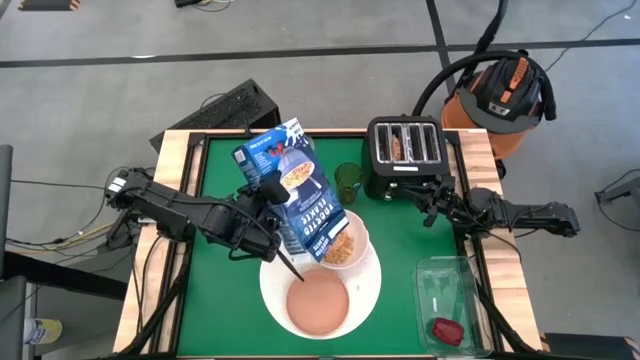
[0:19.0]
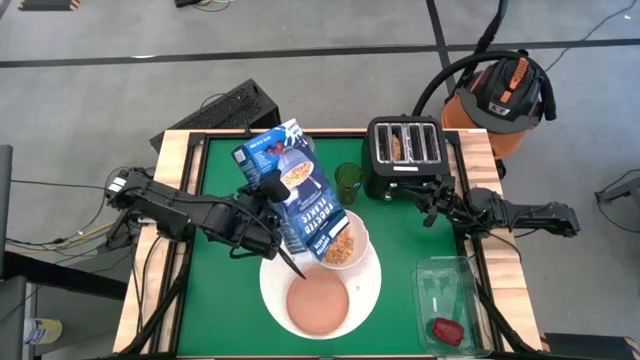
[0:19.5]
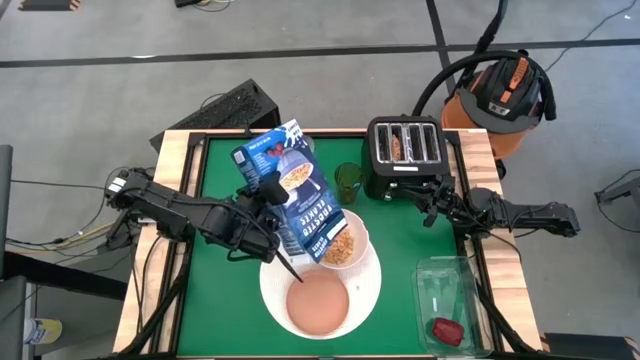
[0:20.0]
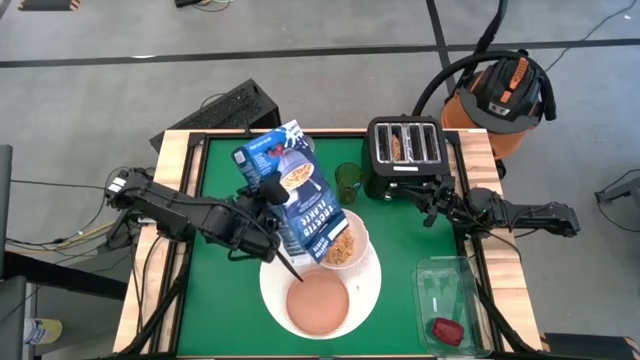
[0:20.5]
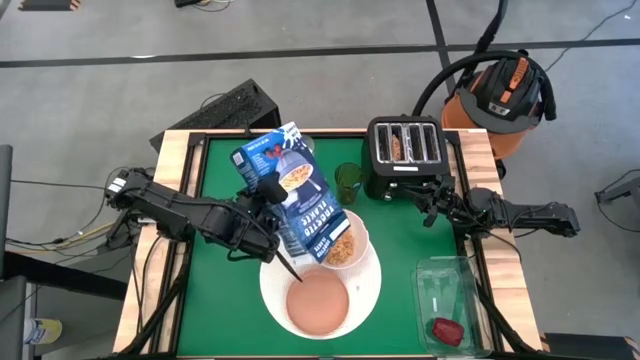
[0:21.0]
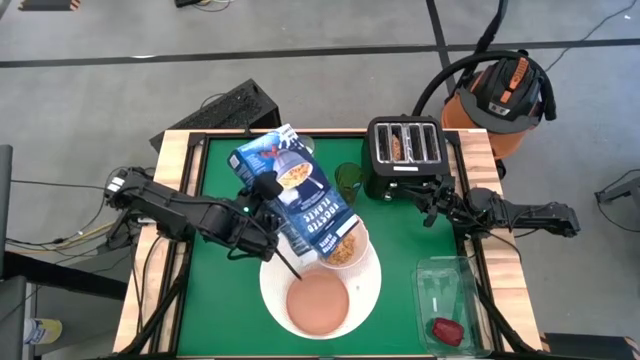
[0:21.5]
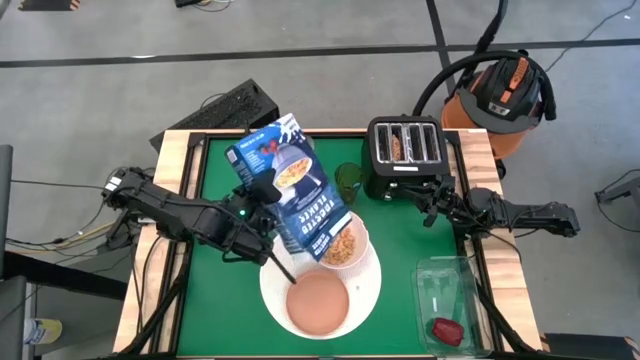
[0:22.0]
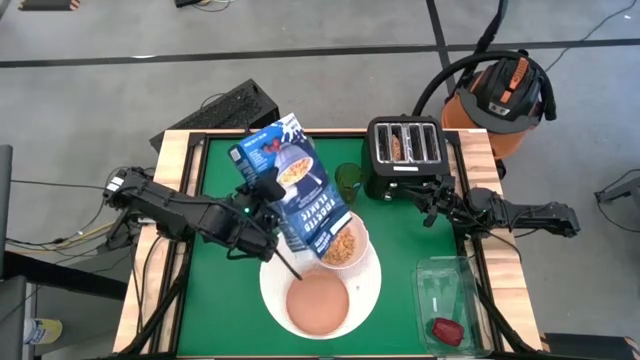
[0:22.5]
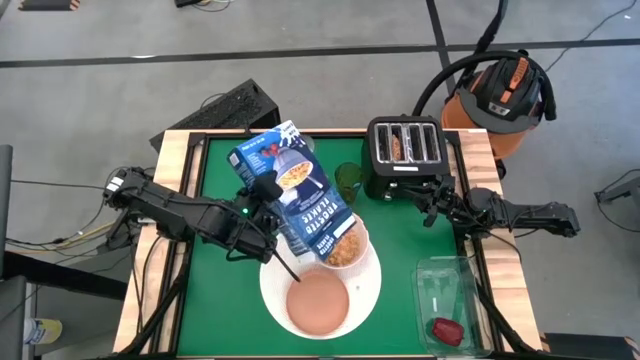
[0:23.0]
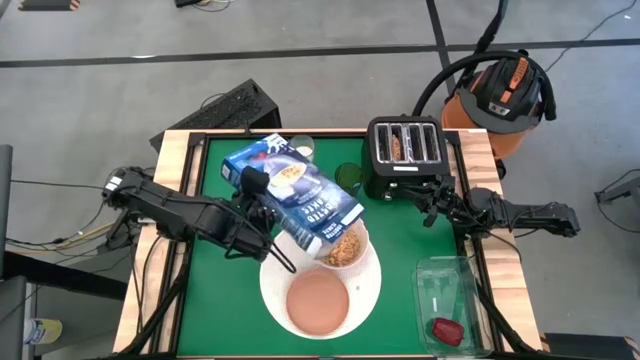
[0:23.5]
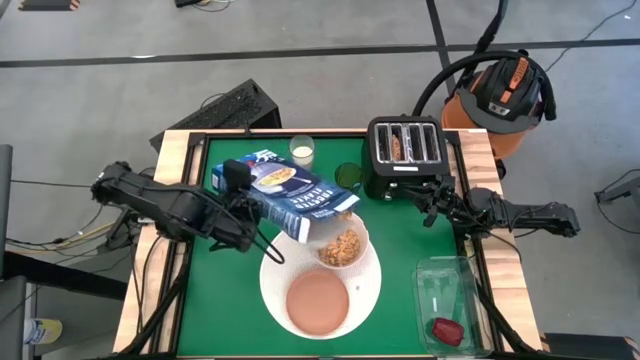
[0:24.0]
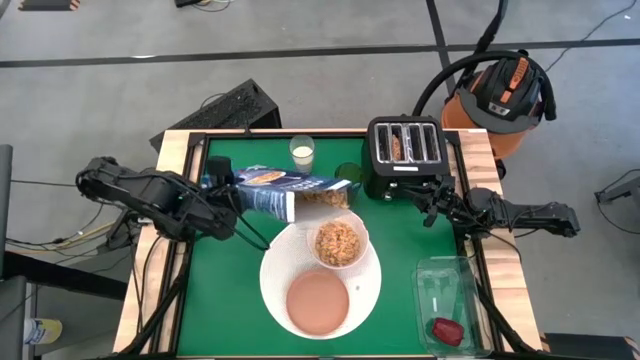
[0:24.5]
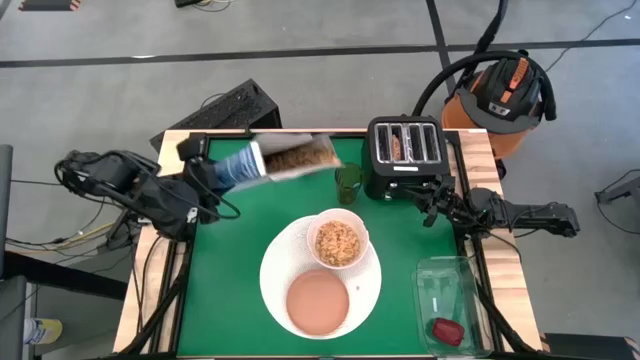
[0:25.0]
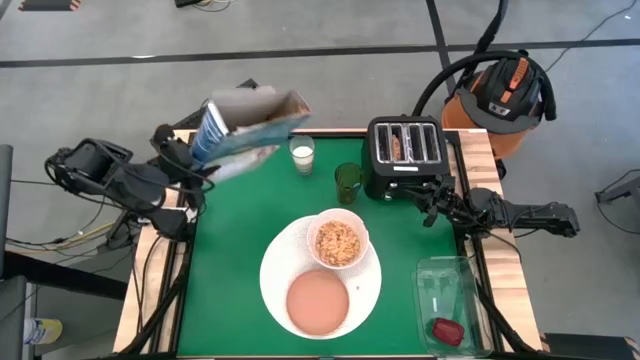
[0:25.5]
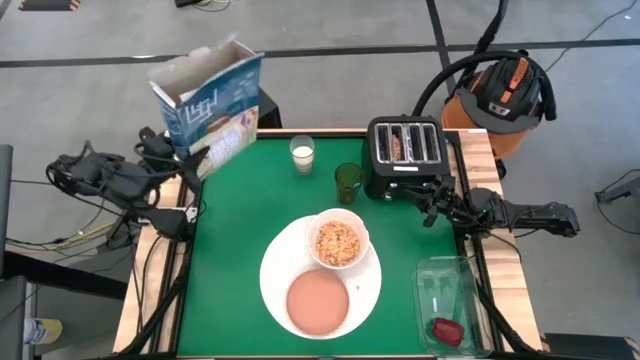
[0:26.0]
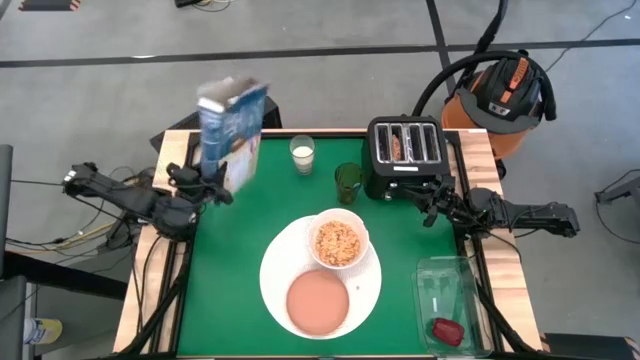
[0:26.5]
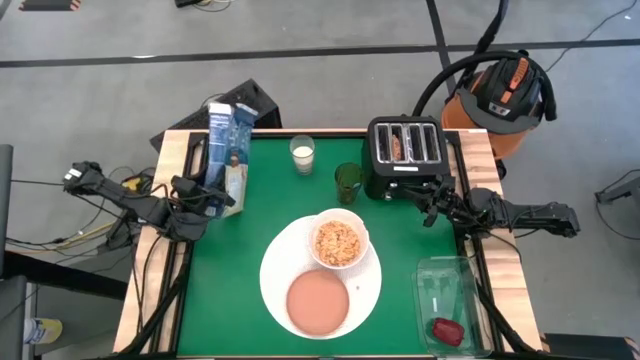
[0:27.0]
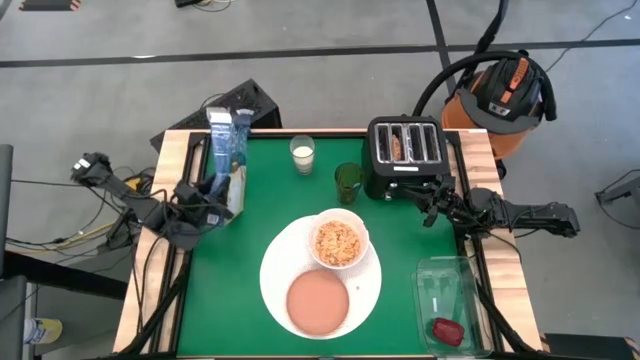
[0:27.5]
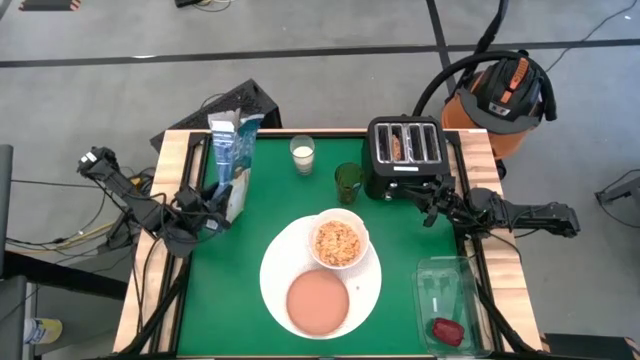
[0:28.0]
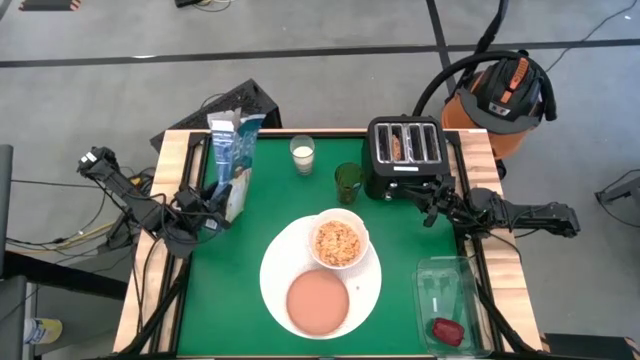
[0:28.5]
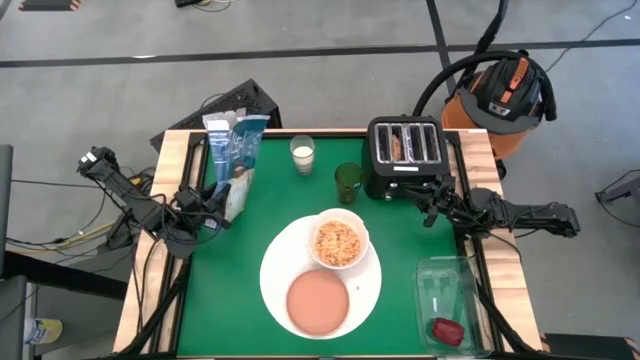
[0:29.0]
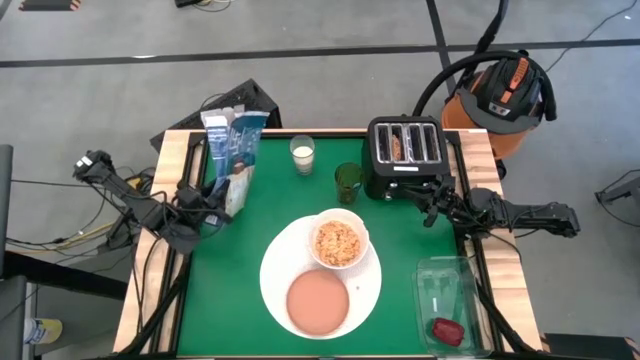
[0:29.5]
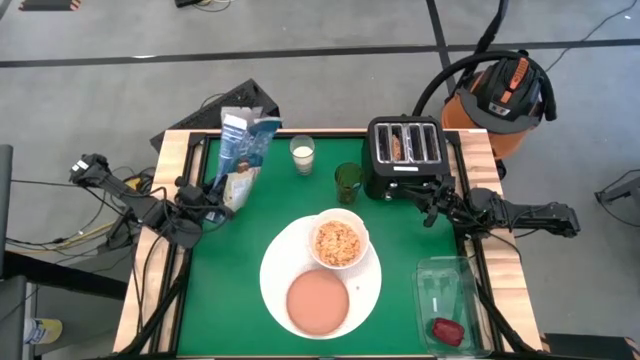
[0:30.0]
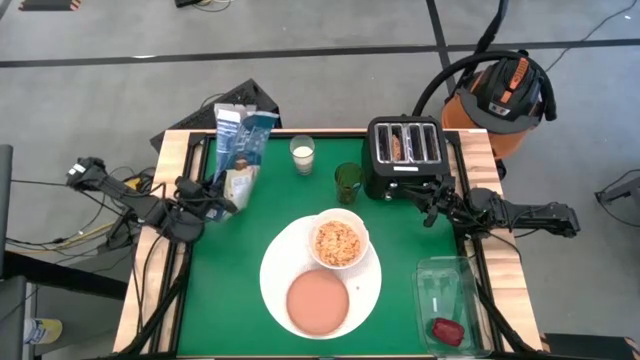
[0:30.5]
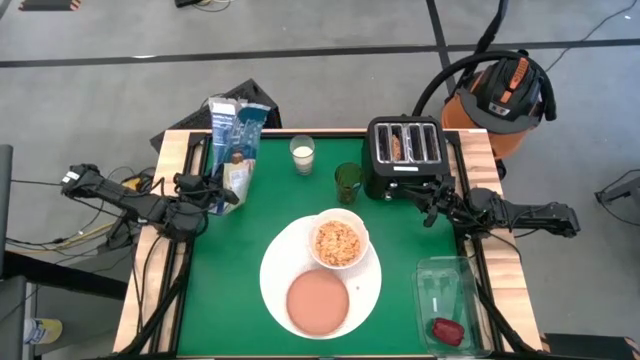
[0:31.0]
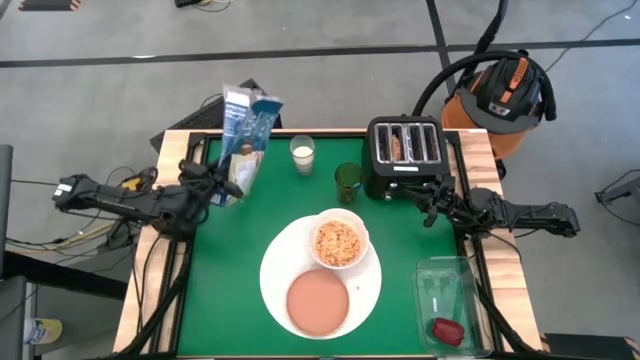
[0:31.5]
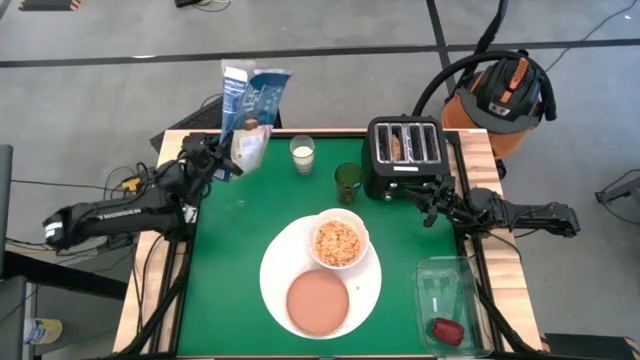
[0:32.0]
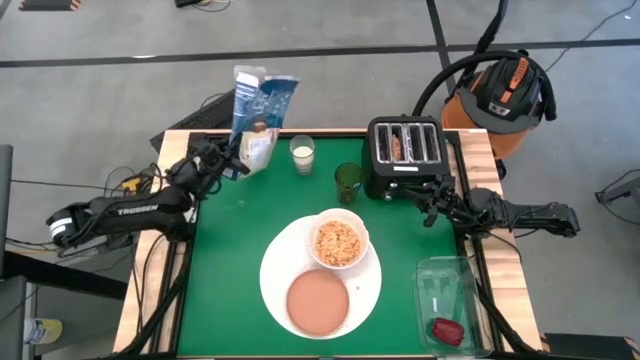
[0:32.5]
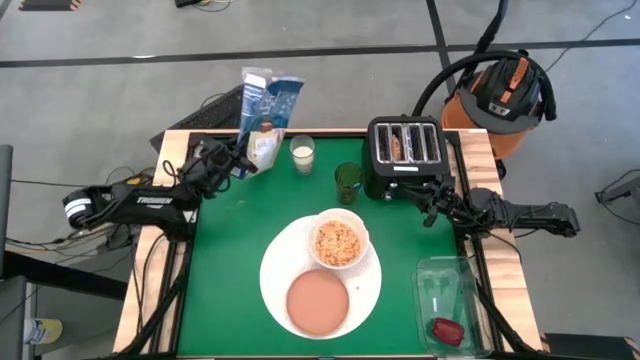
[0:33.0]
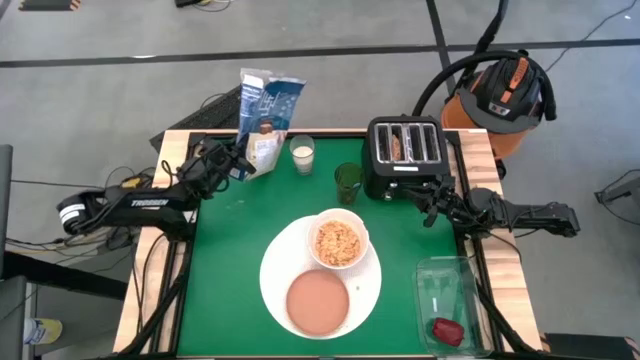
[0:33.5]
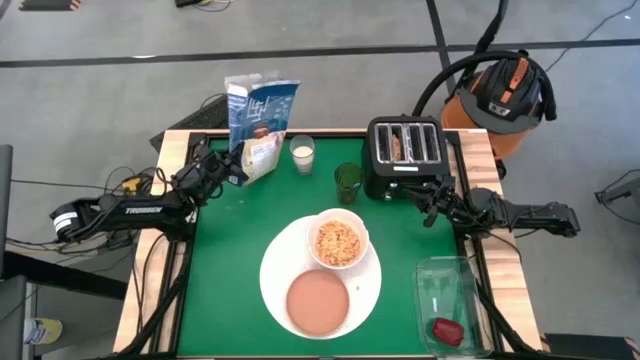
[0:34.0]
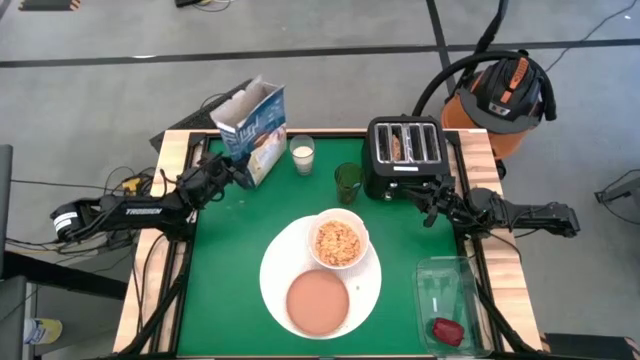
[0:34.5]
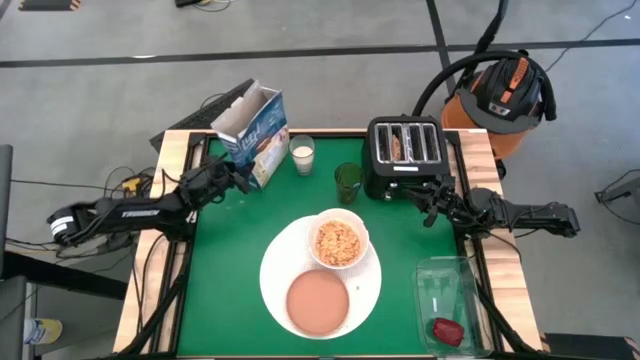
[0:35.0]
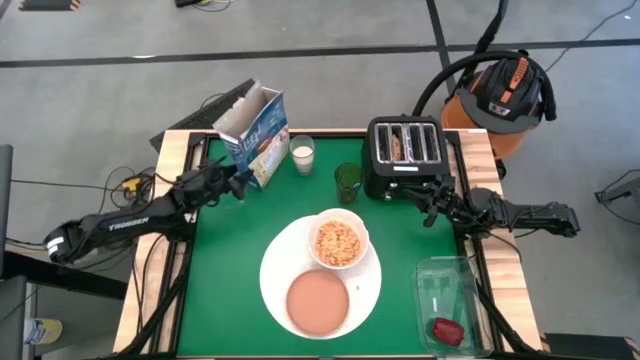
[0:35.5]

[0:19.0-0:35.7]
Task: Arrange a breakfast setting
Pour the cereals from the cereal box into the white bowl

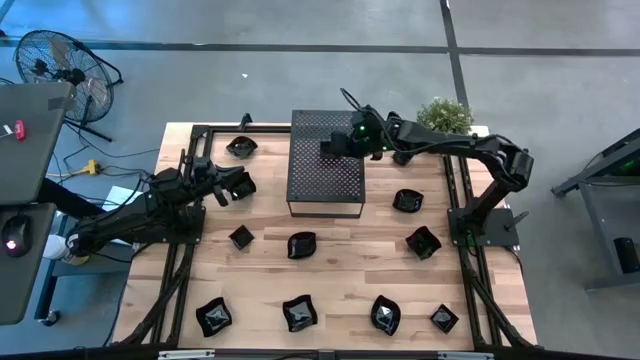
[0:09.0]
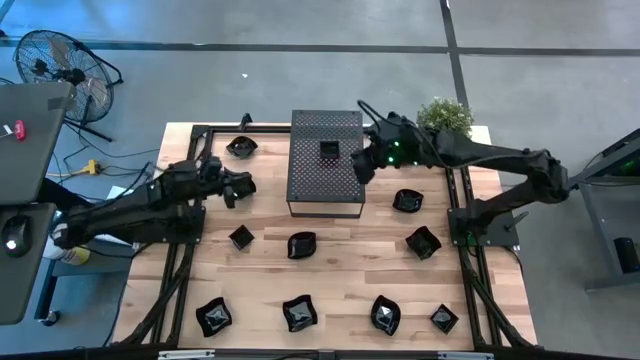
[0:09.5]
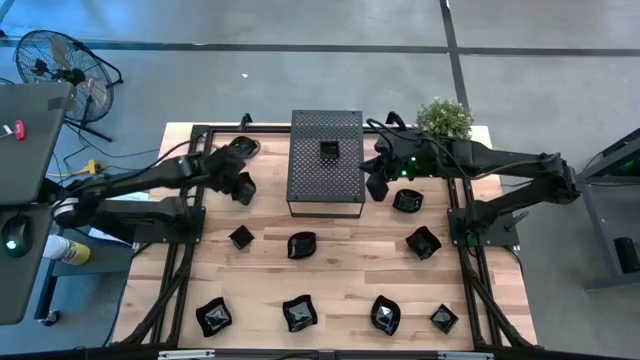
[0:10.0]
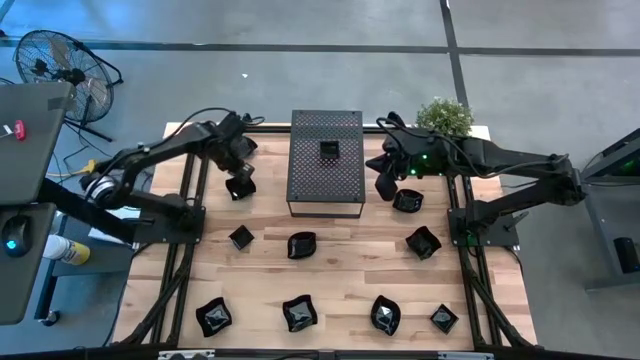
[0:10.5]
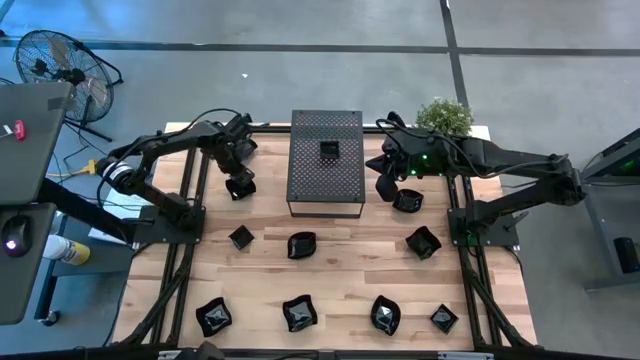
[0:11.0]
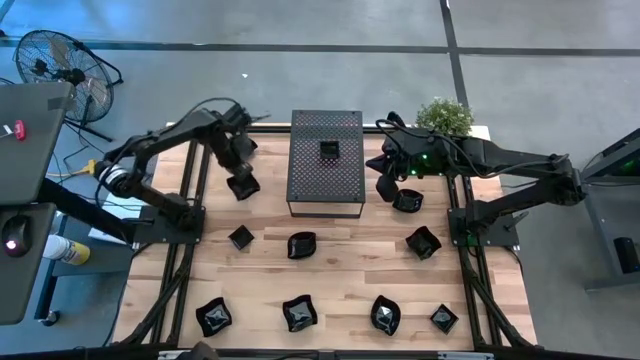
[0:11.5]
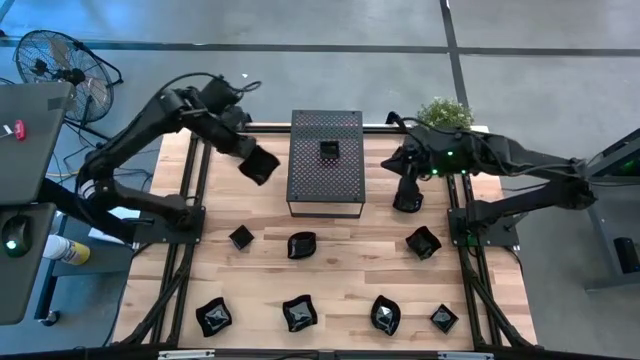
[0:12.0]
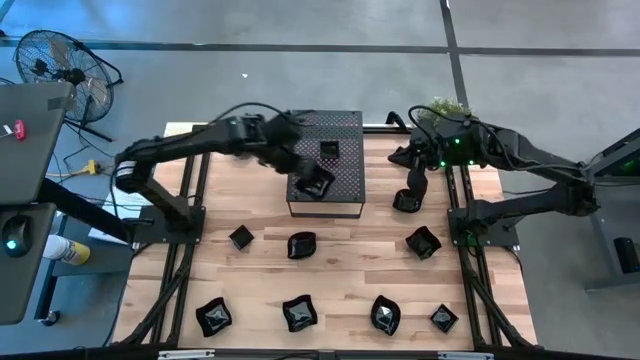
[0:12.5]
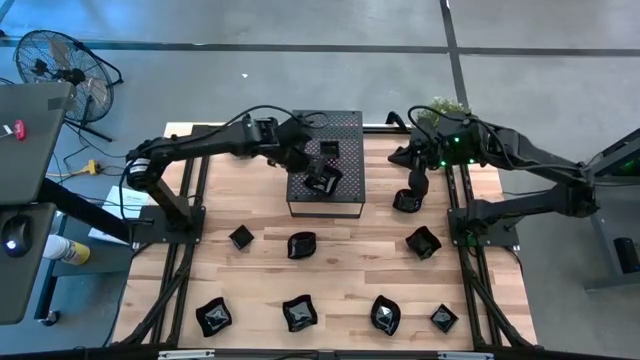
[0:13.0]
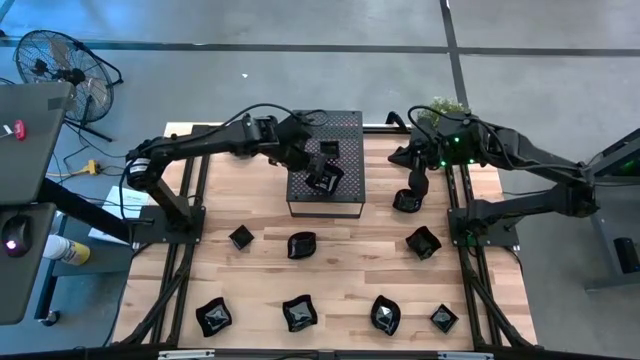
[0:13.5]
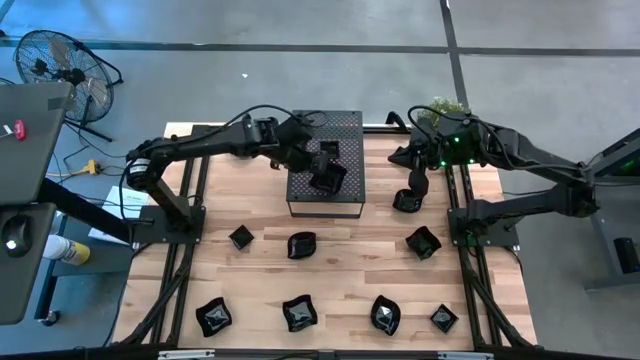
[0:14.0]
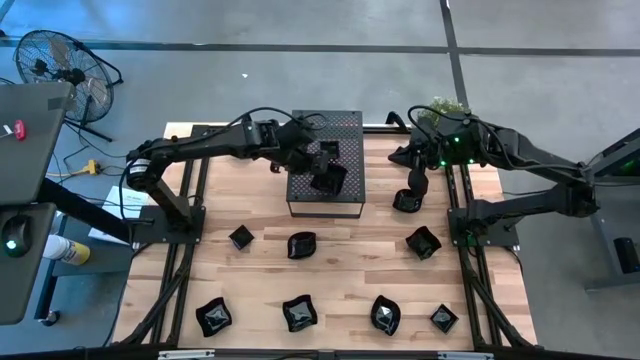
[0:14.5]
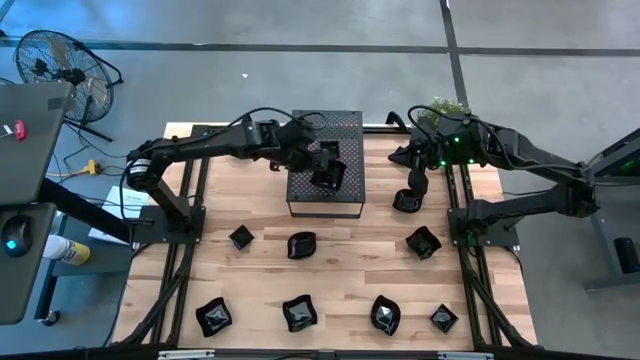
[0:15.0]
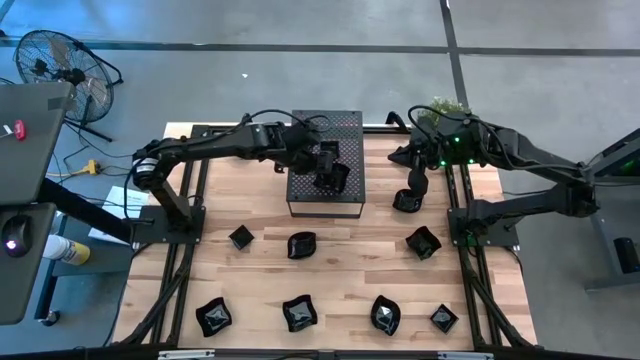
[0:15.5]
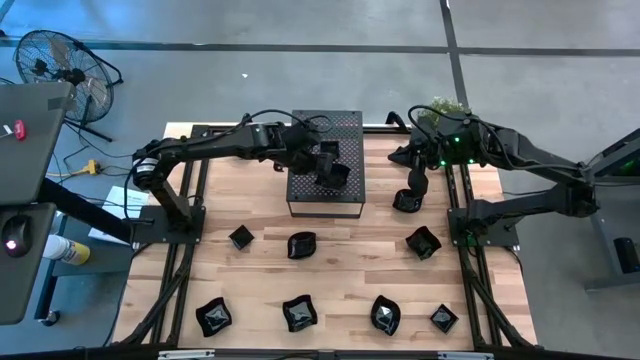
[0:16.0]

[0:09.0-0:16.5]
Task: Pick & Place Mini shaped plates
Put the distorted square plate on the shelf
